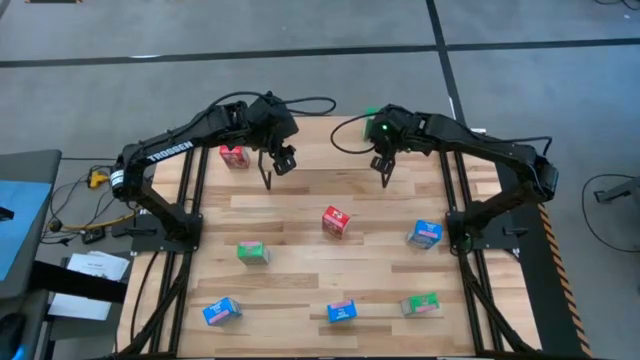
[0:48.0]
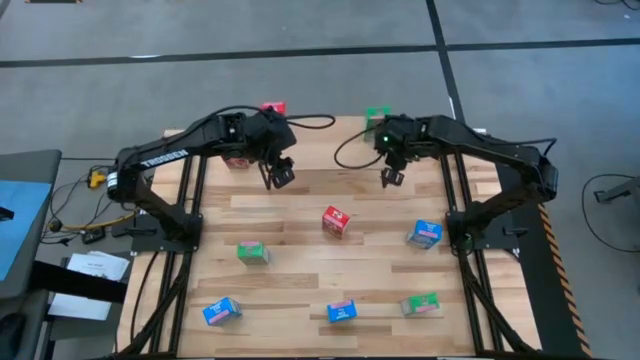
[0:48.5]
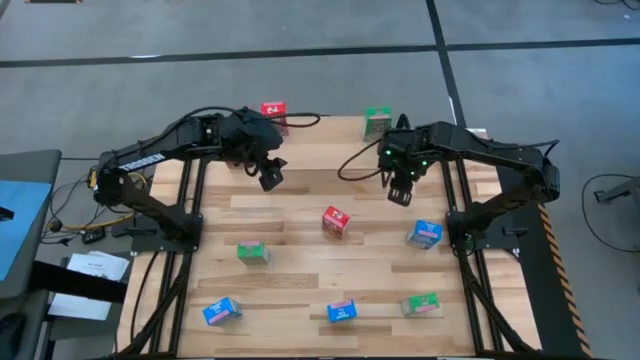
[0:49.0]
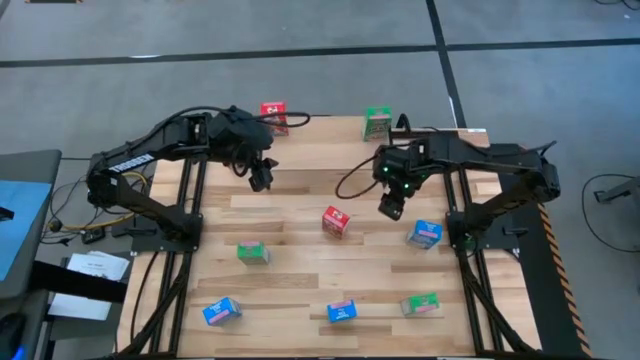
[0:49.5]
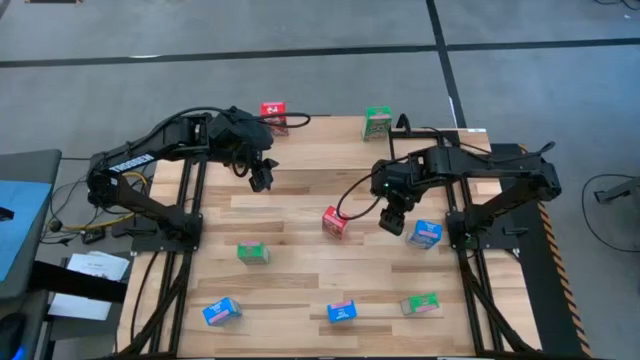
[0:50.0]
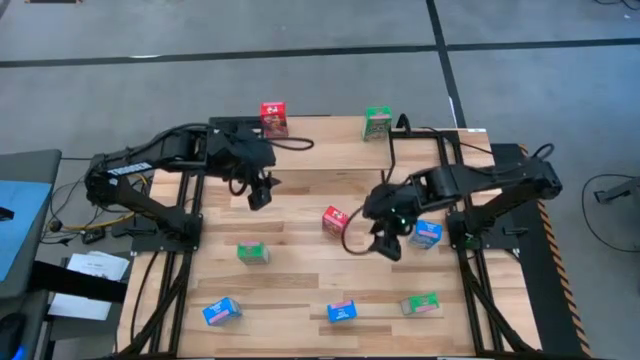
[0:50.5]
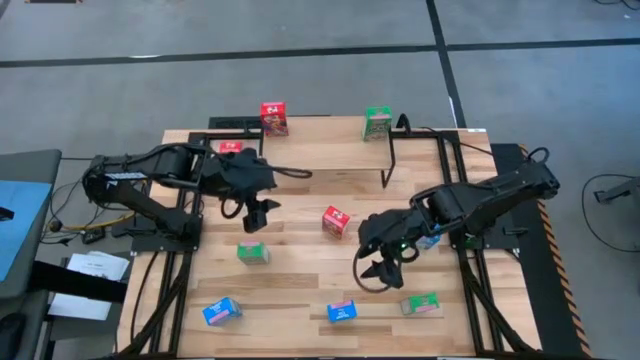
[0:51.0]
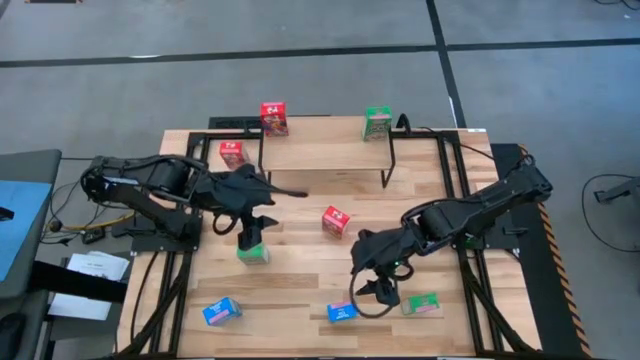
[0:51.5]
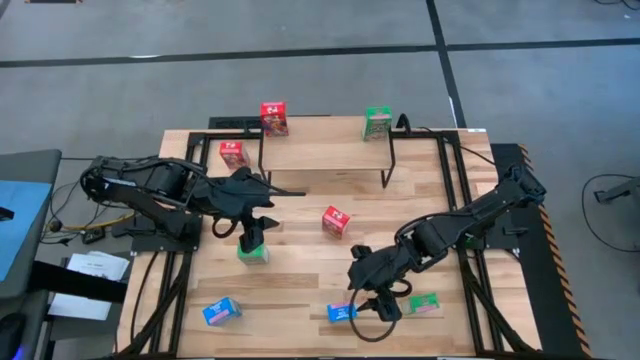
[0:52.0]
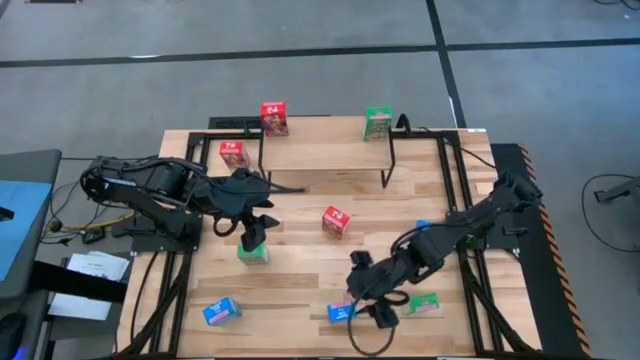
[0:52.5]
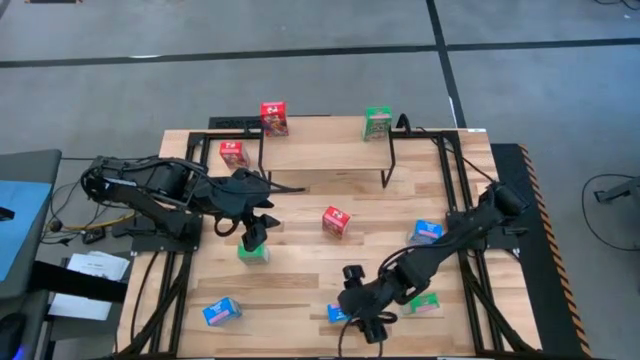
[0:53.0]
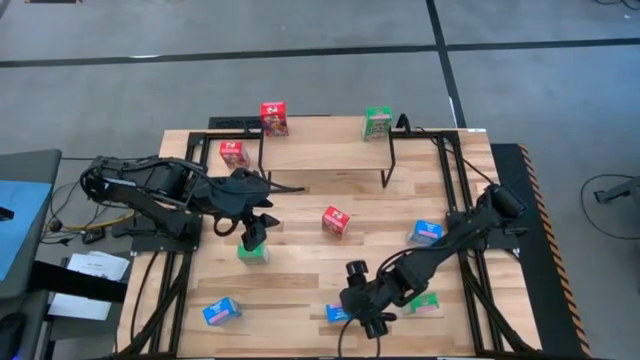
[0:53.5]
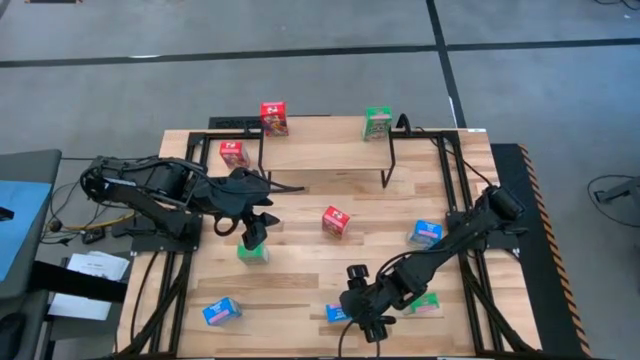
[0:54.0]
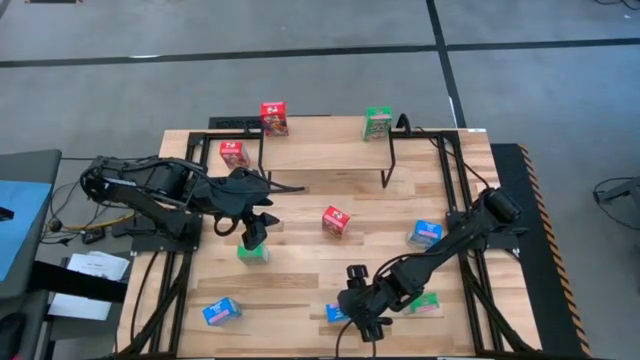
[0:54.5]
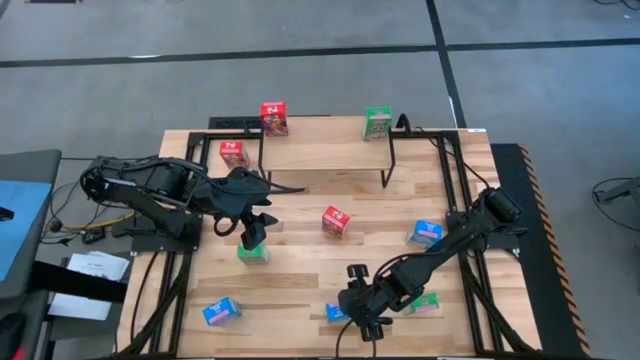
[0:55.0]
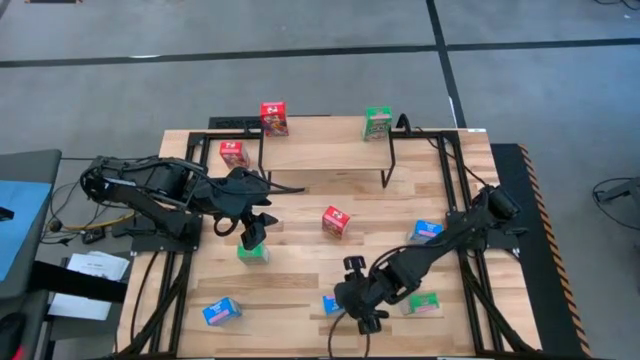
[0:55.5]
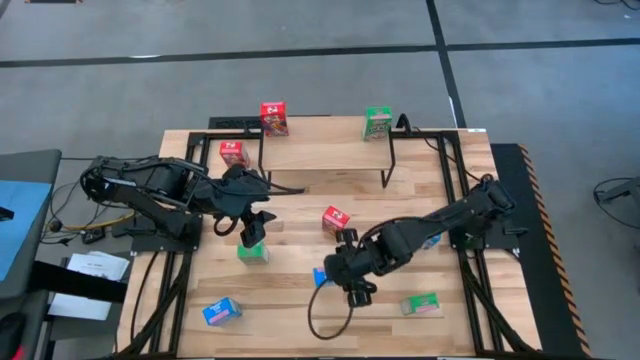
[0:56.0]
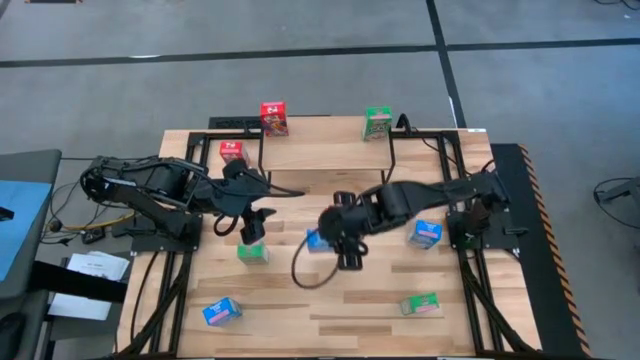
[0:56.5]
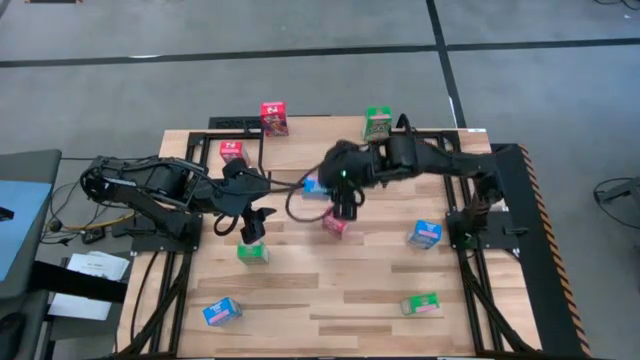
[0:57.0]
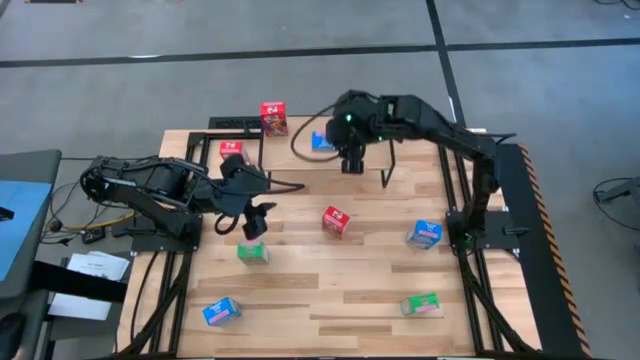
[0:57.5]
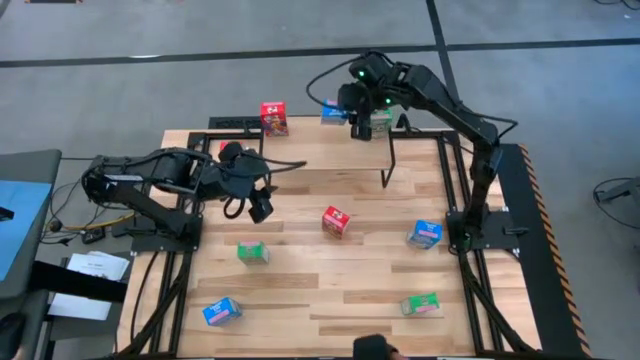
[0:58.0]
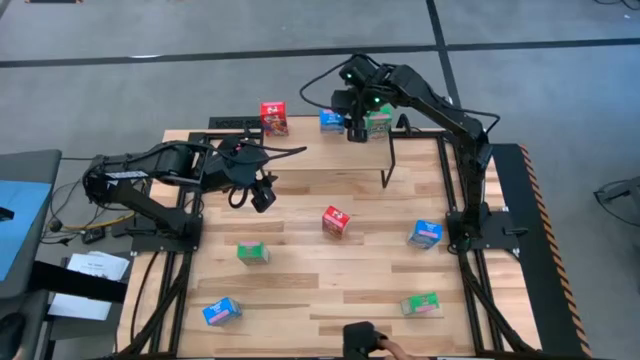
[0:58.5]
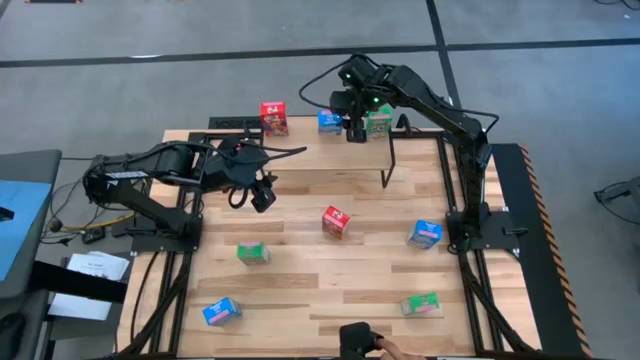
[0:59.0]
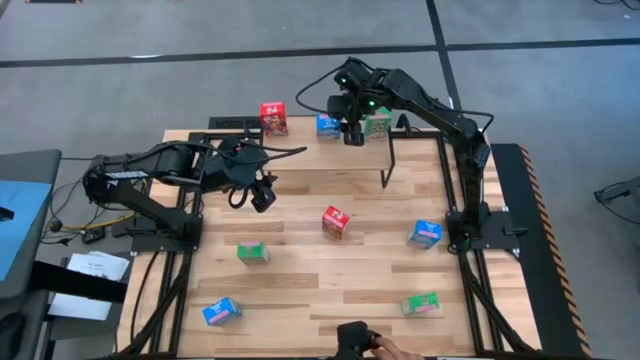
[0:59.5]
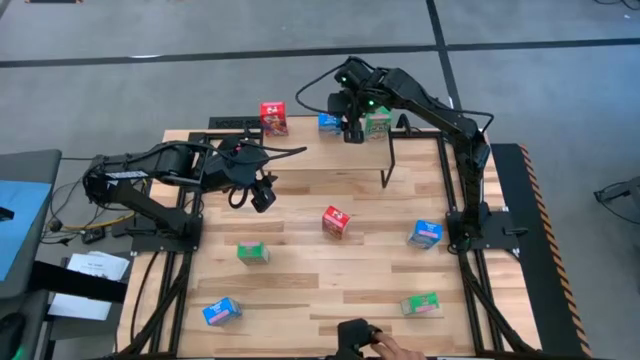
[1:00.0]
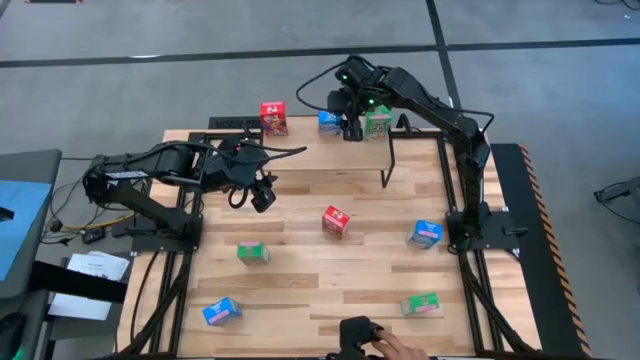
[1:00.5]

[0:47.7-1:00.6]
Task: Stack cereal on shelf
Put the bottom right blue cereal box on the shelf

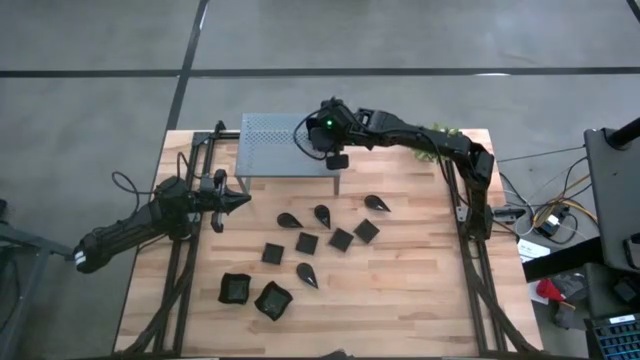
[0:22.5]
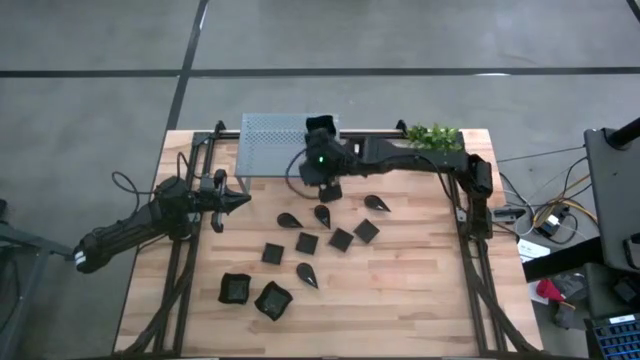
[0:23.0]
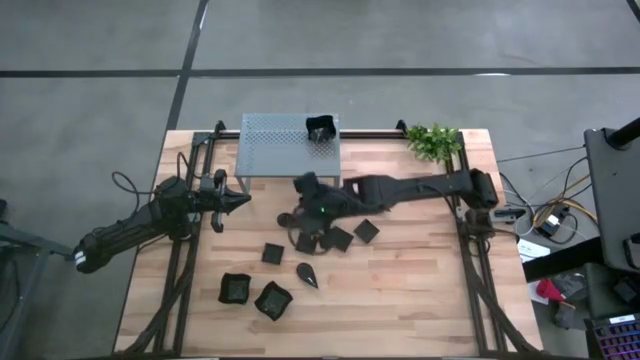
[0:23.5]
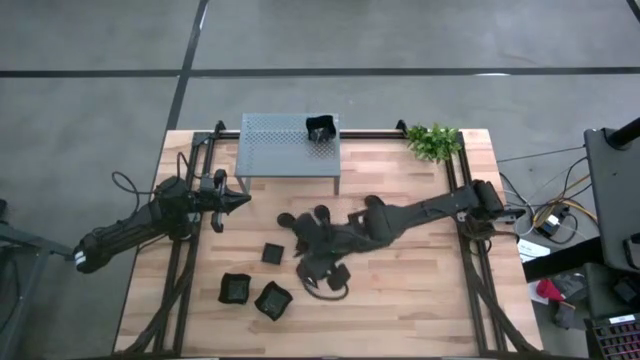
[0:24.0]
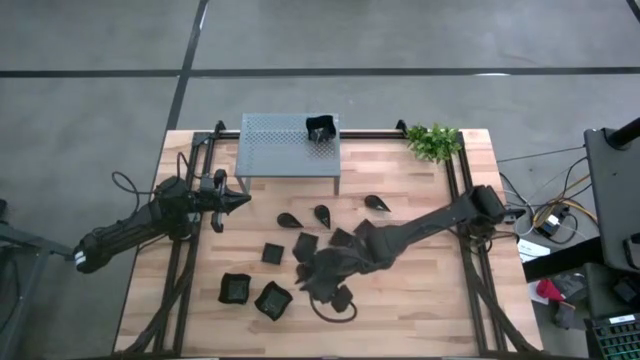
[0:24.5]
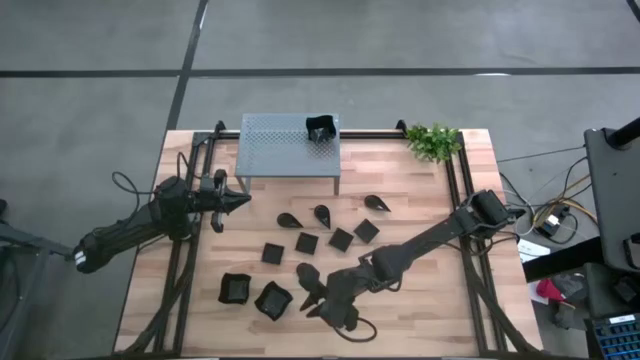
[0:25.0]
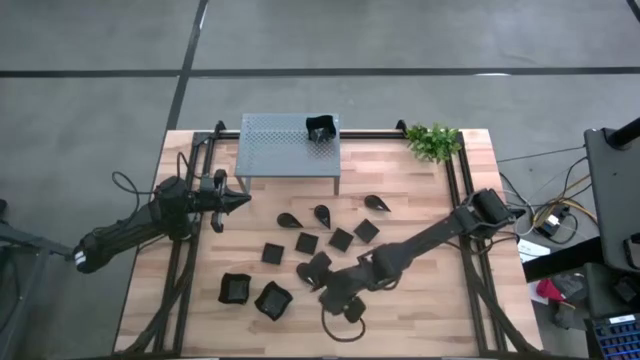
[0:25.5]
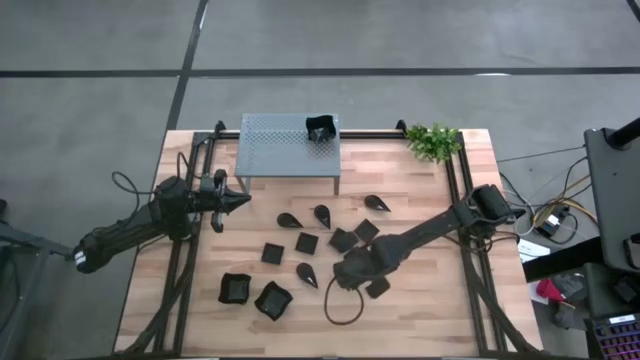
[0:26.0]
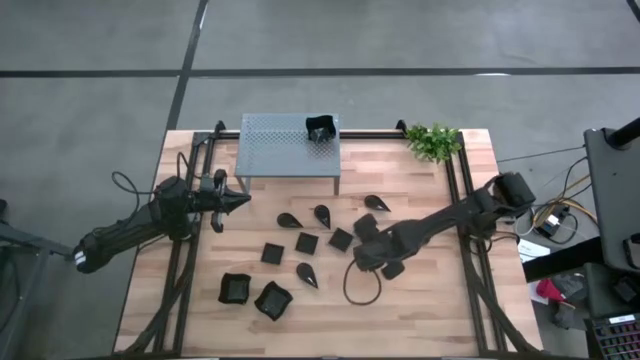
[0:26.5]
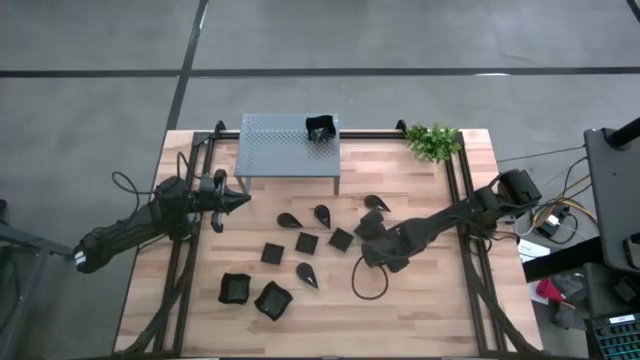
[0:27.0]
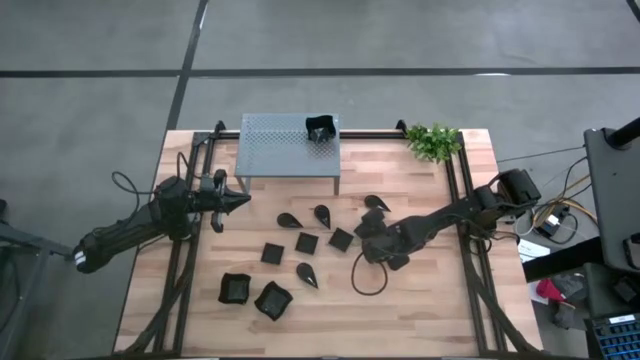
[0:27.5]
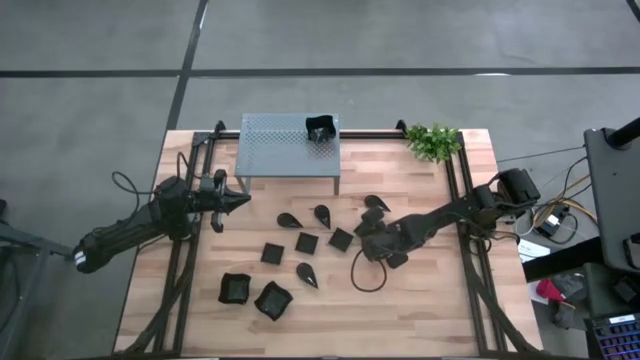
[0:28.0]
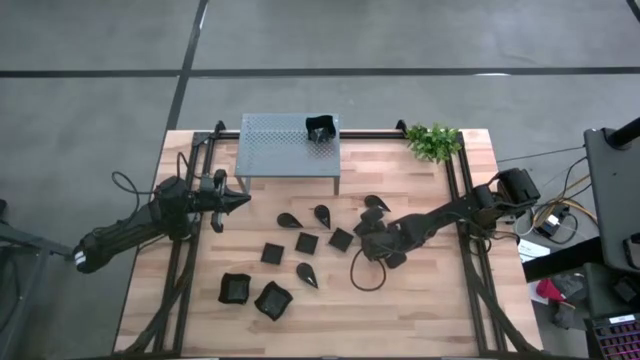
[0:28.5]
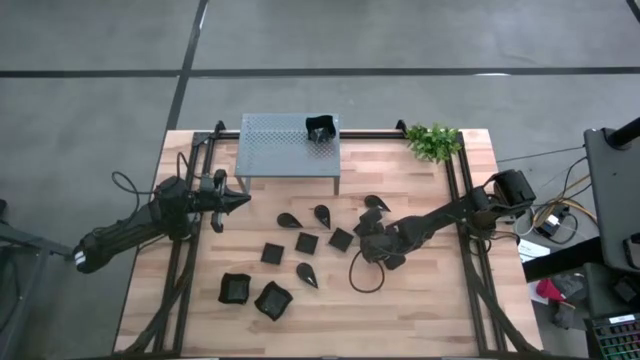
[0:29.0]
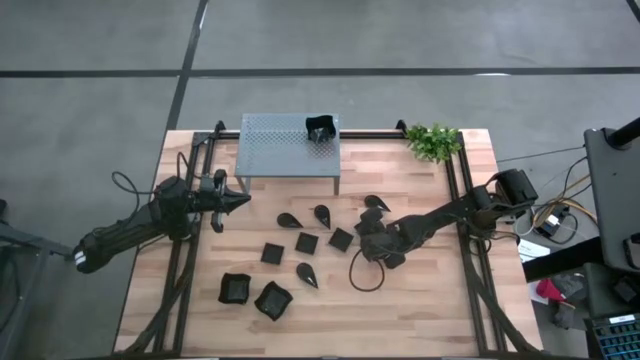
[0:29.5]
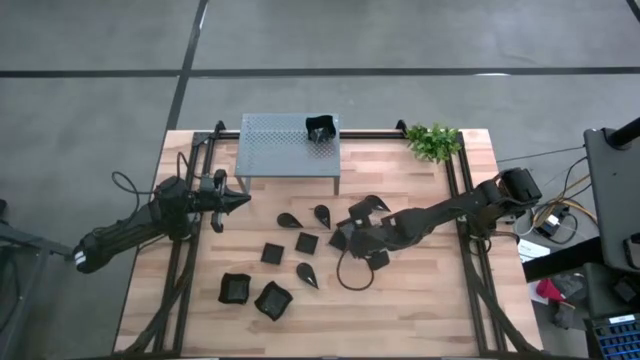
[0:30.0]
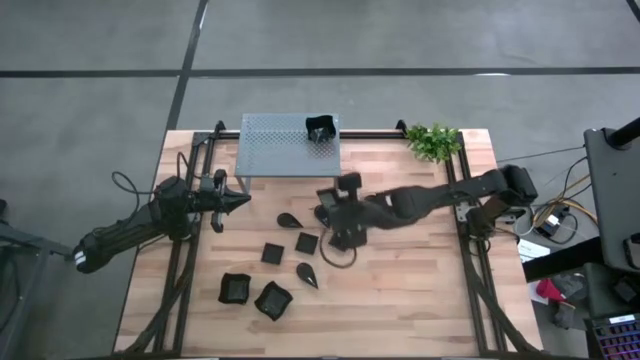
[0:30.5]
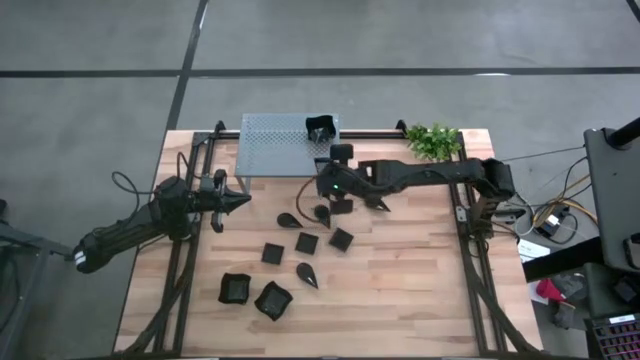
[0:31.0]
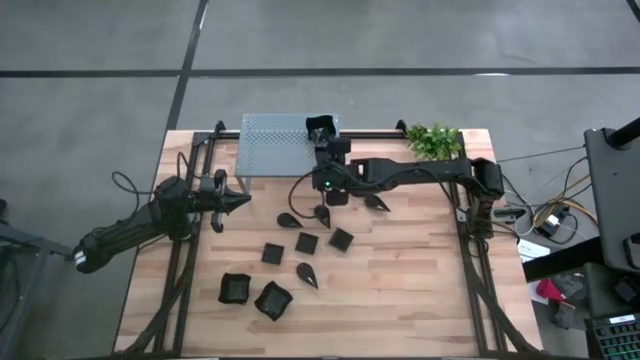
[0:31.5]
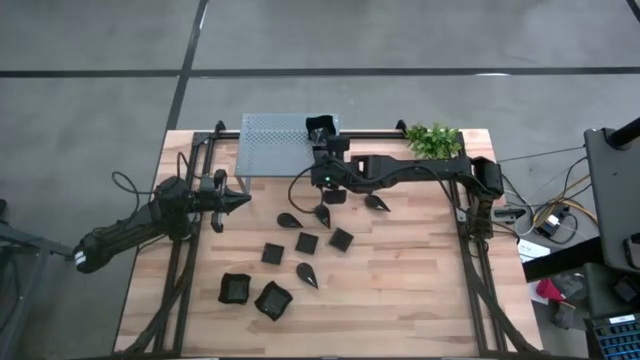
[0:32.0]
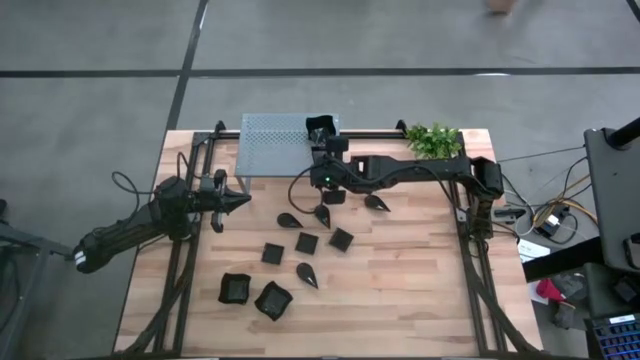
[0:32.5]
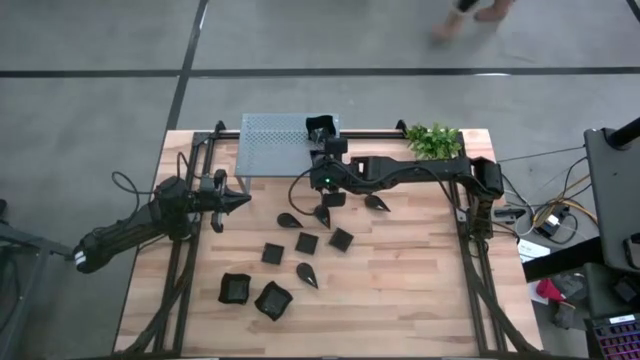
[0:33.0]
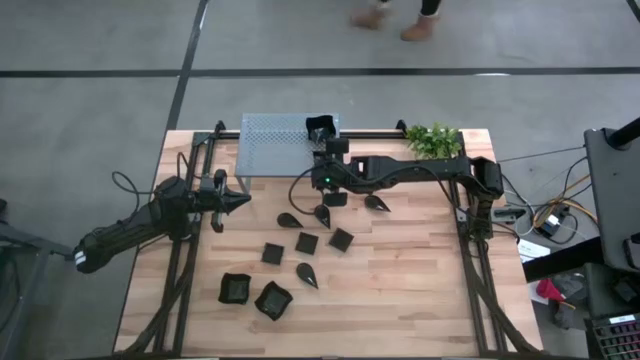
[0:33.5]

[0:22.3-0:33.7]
Task: Pick & Place Mini shaped plates
Put the black square plate on the shelf
